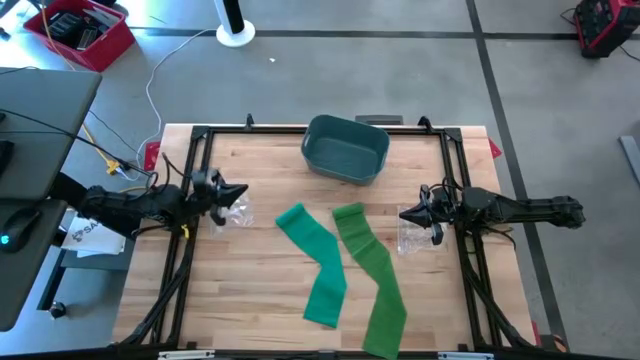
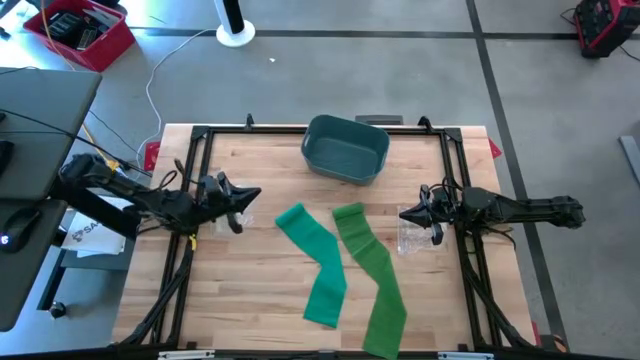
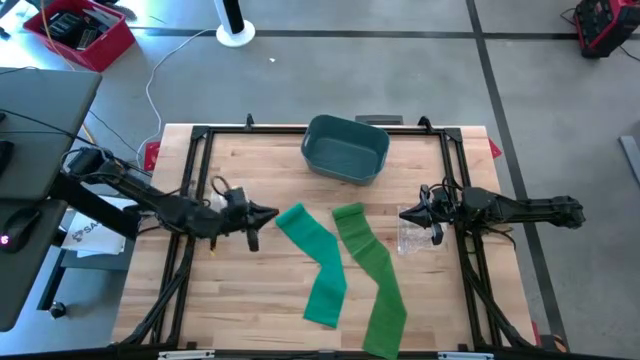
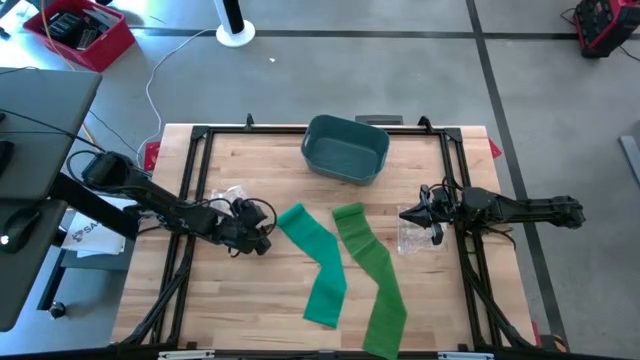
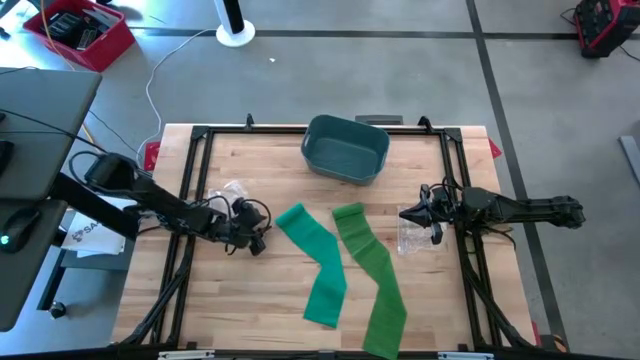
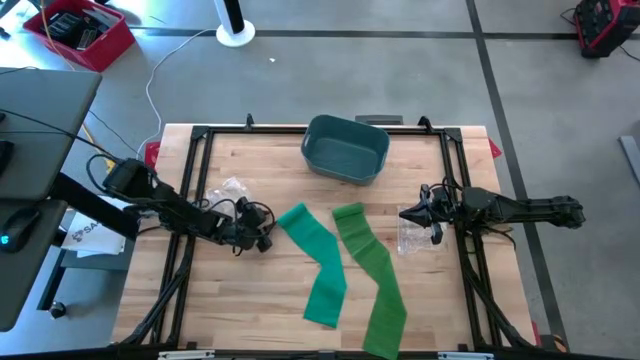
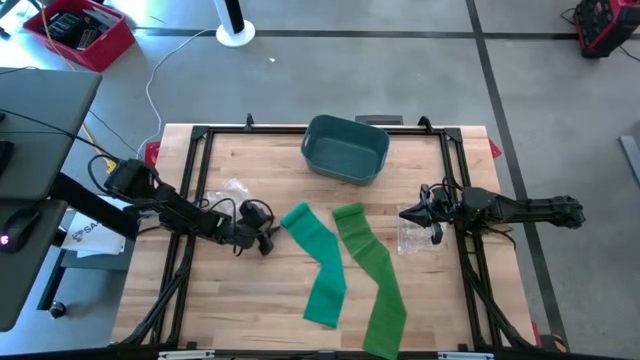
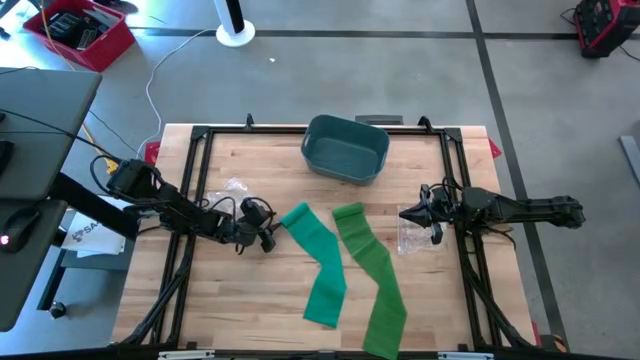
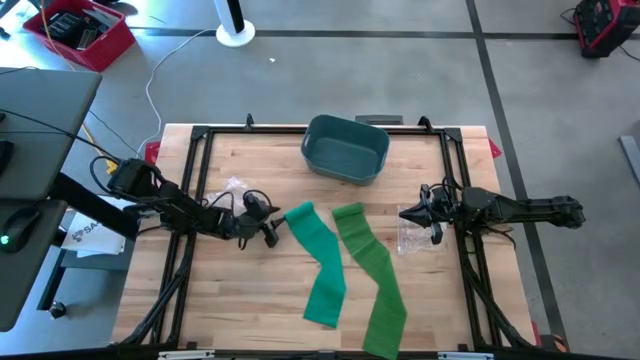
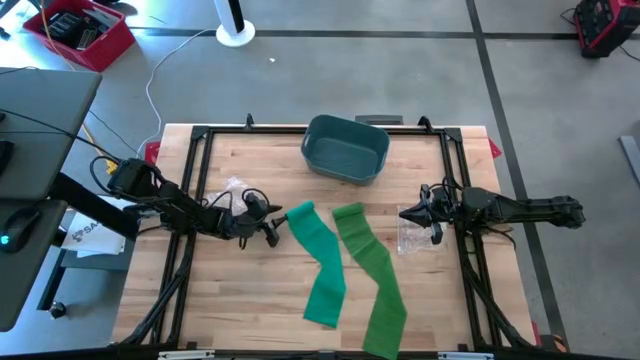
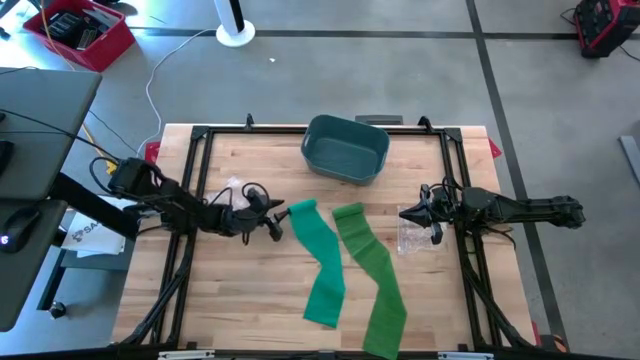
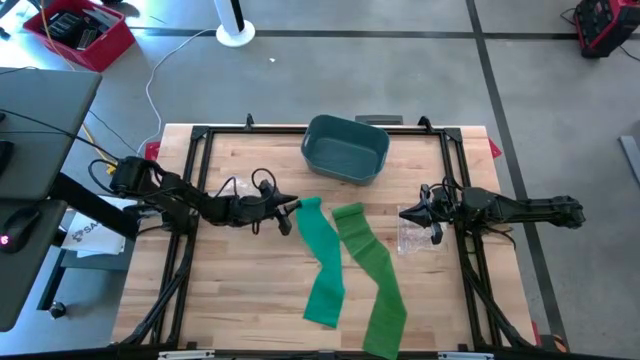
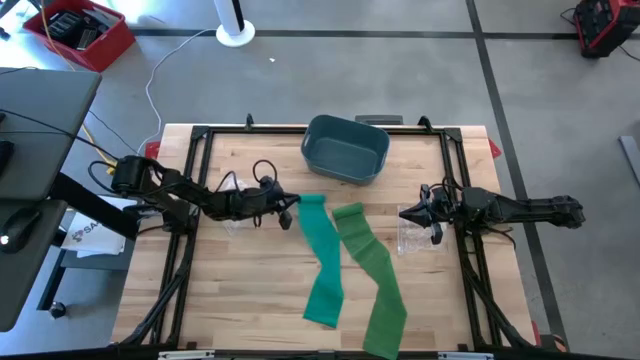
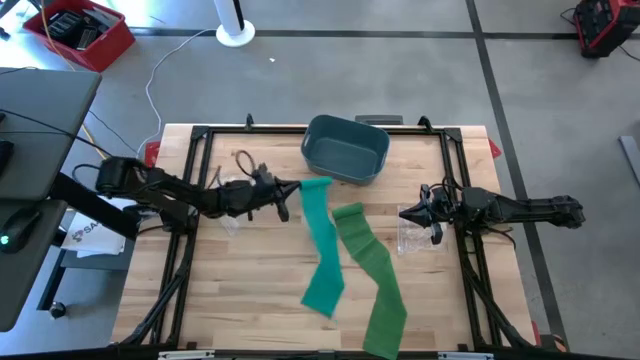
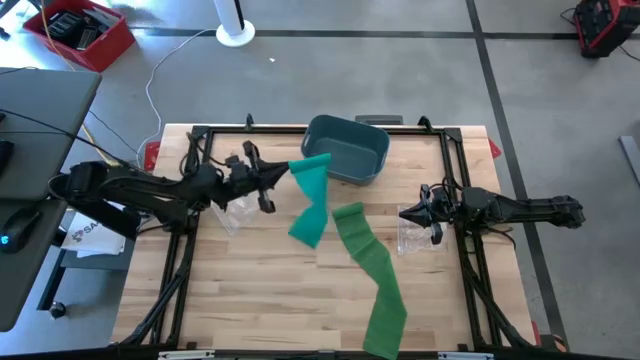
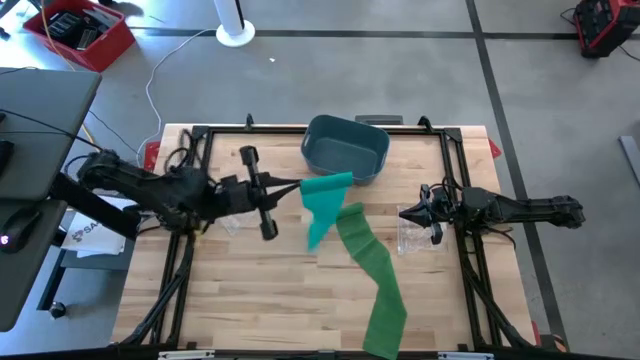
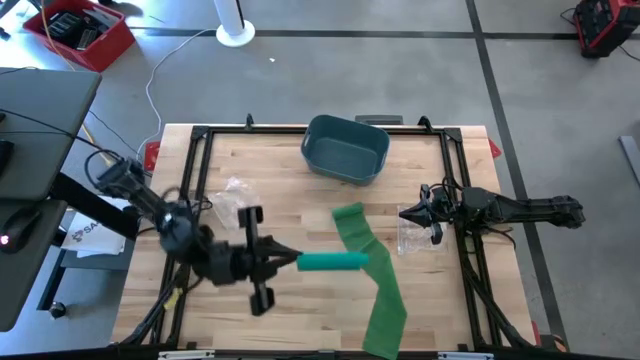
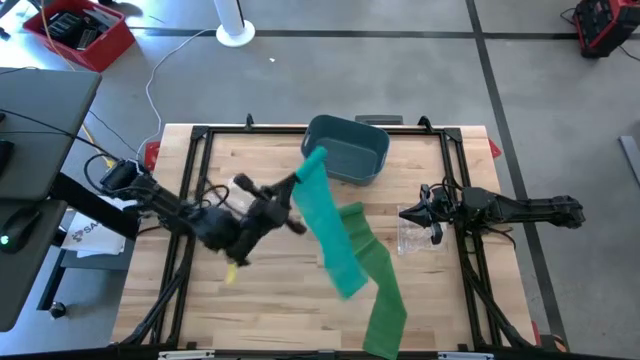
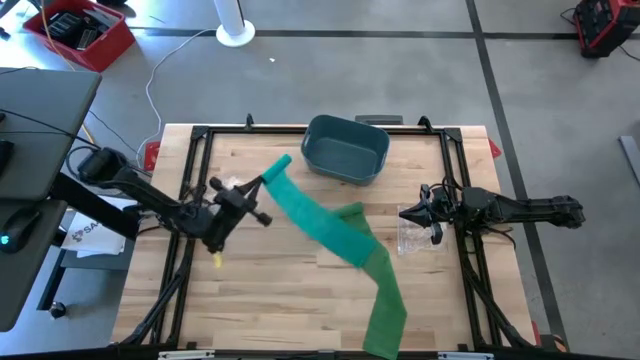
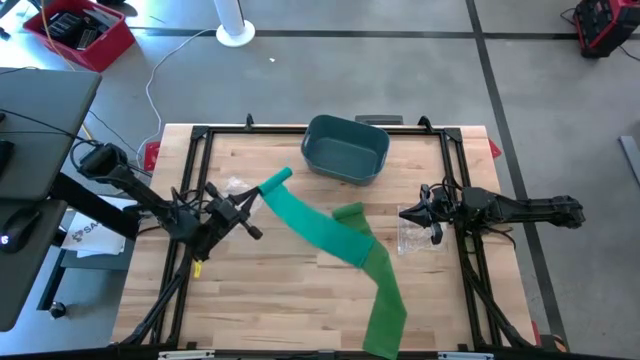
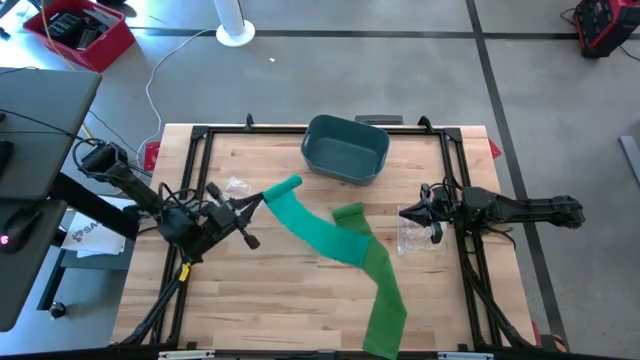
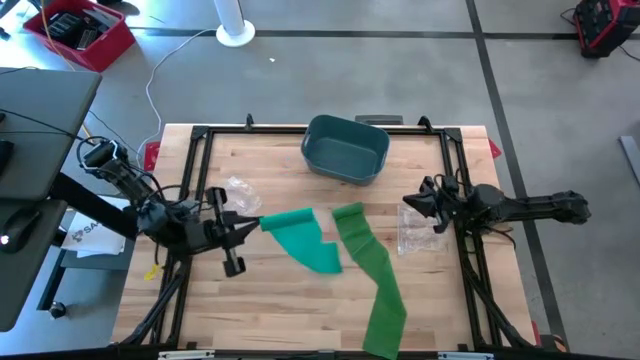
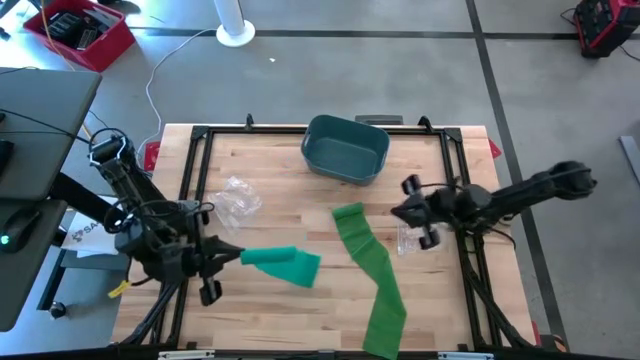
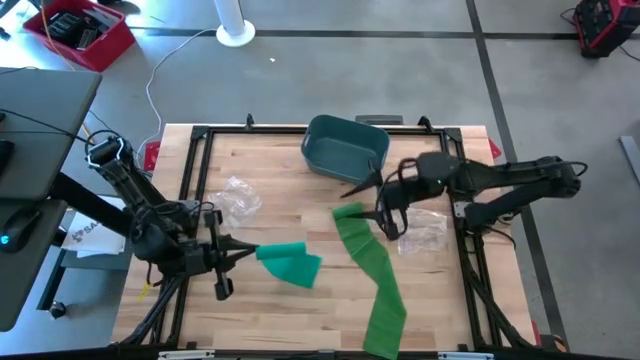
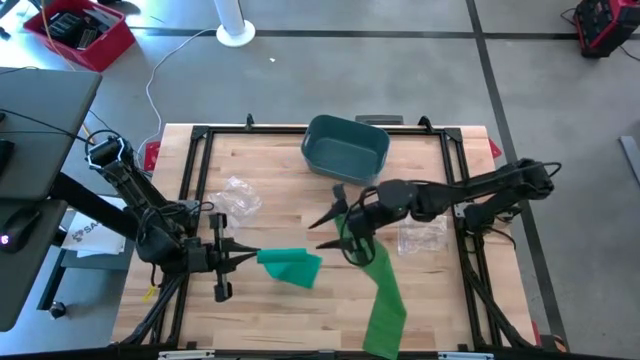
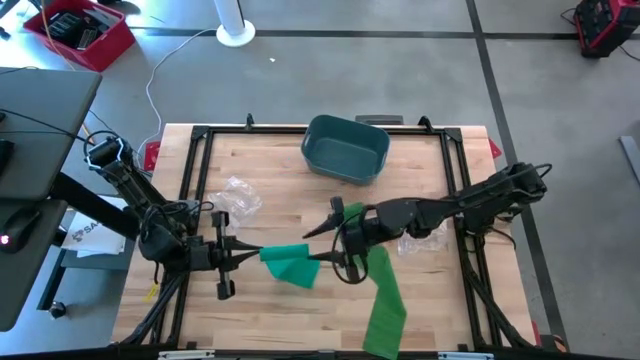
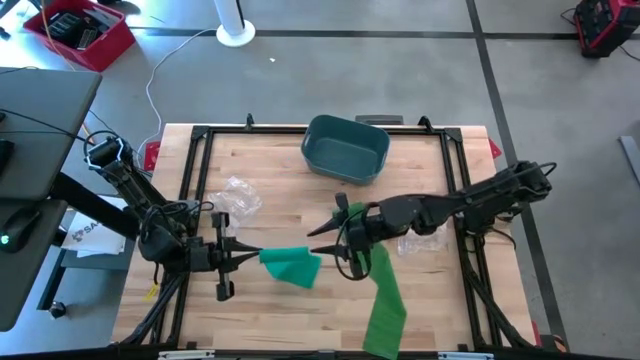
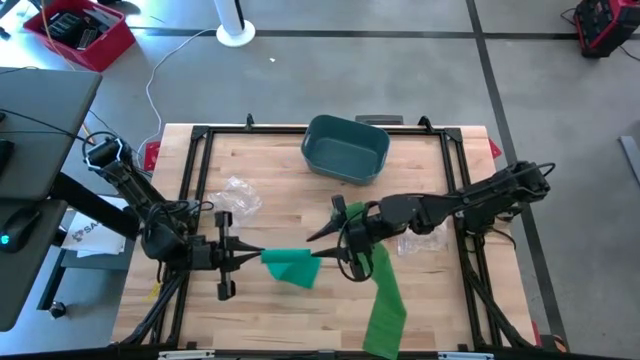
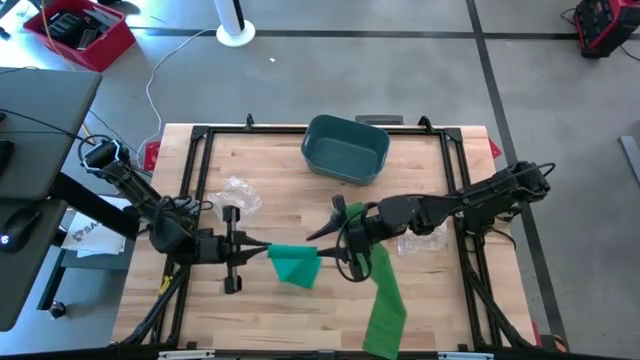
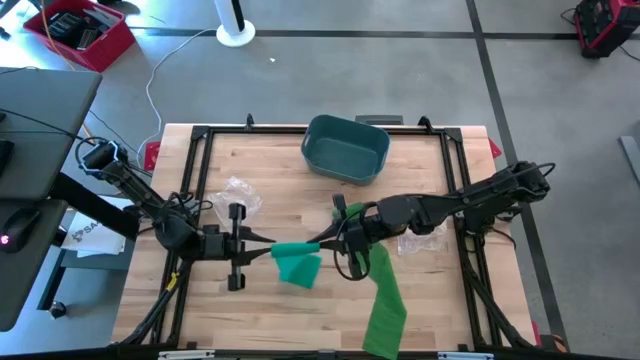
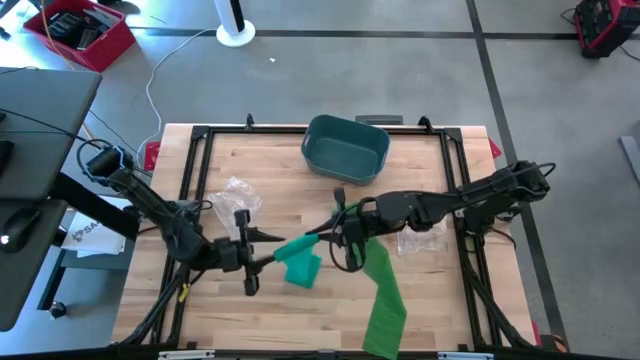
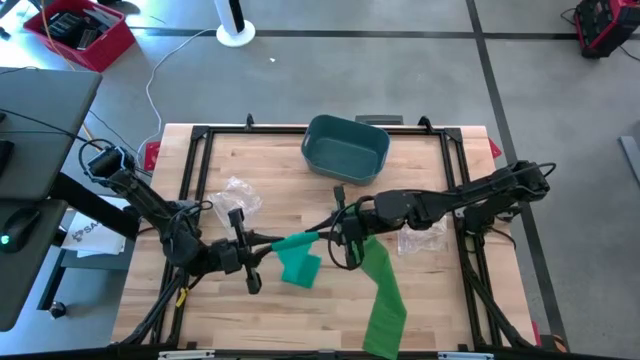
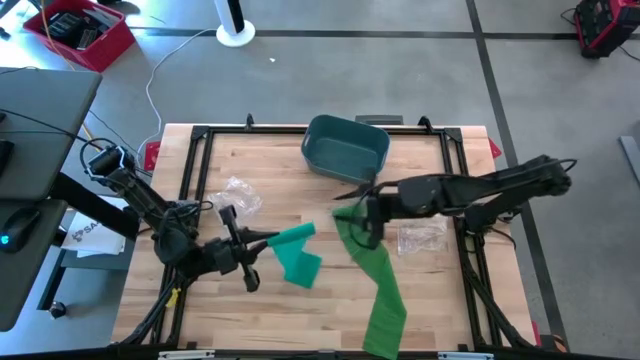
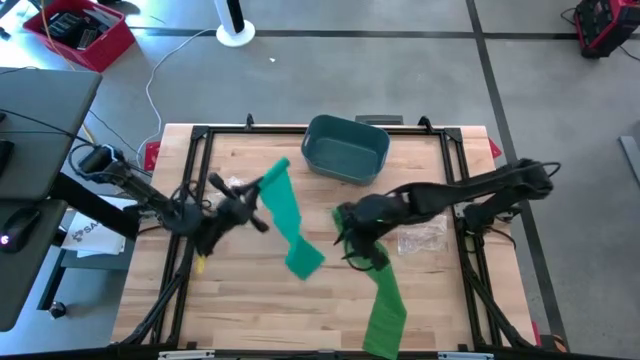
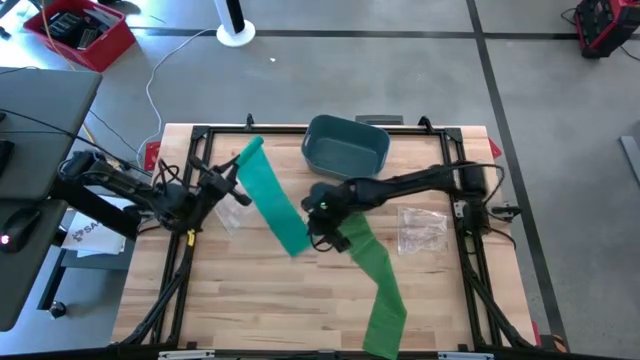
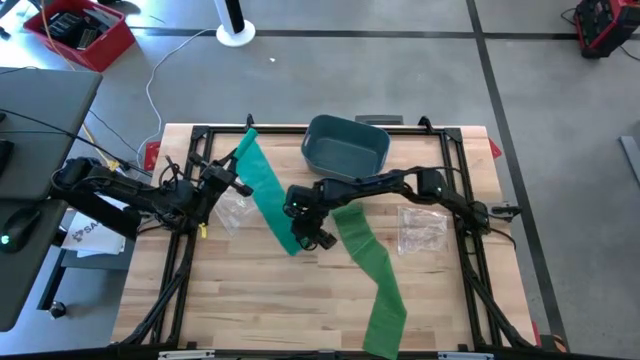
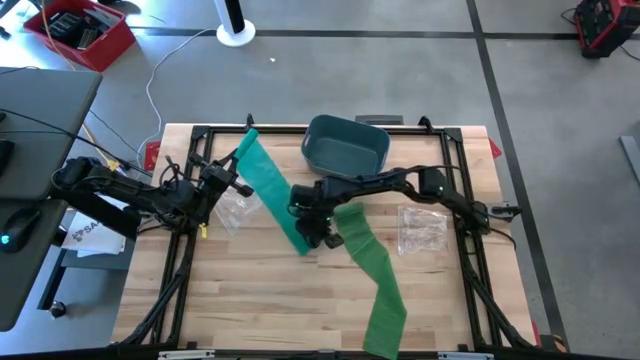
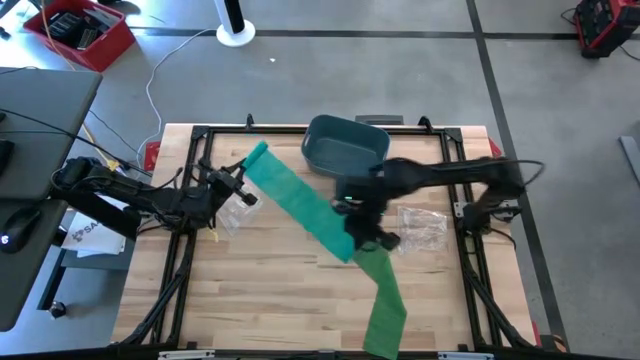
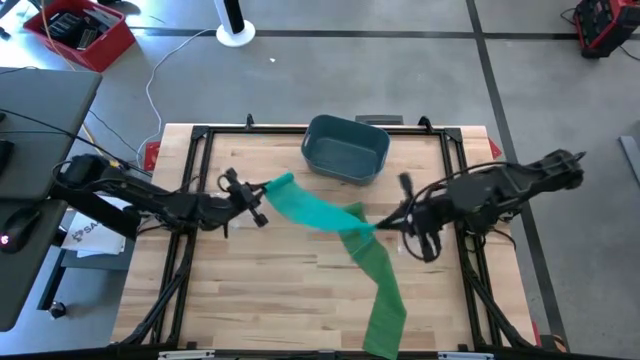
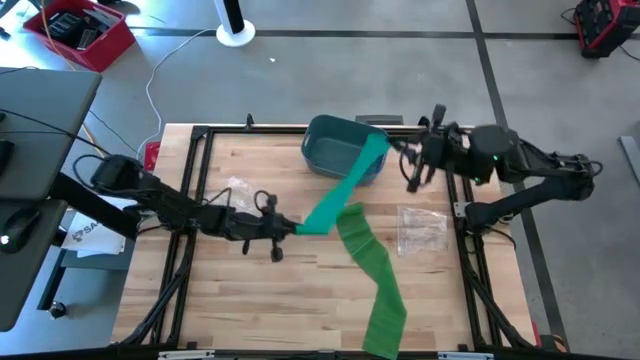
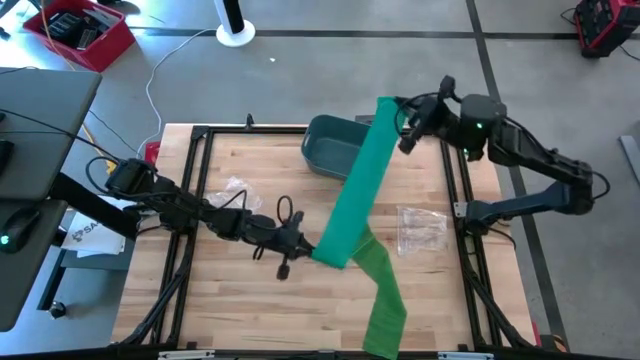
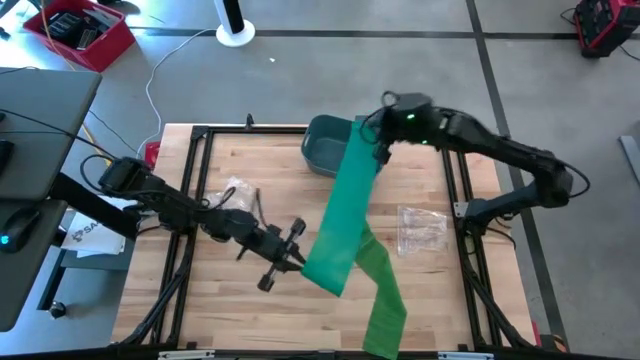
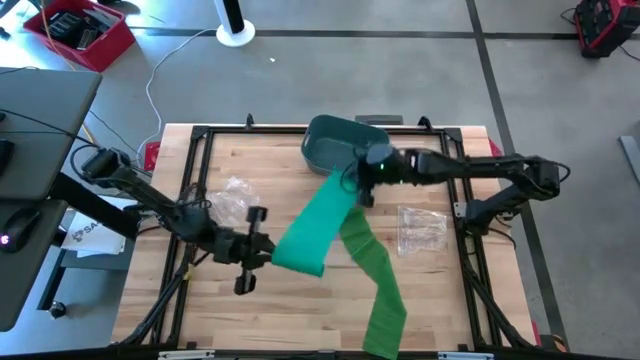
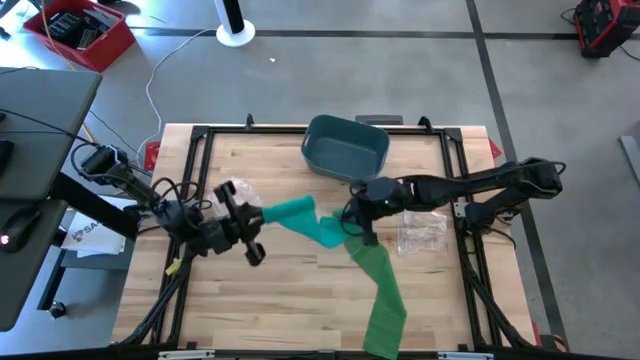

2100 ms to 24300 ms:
Task: Roll bandage
Roll the light green bandage
